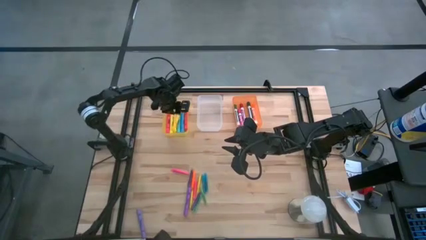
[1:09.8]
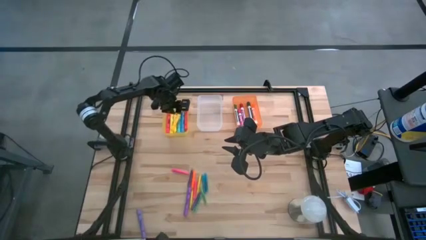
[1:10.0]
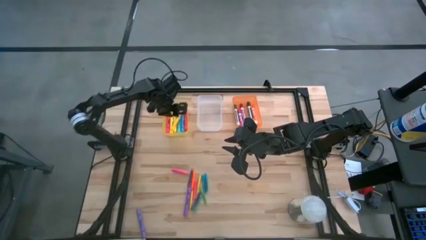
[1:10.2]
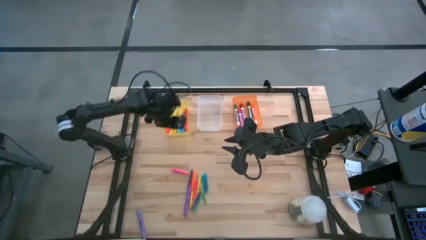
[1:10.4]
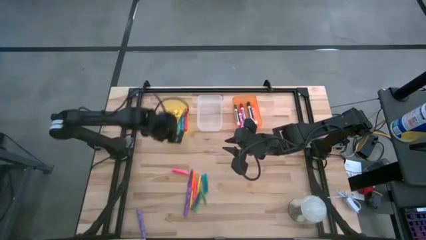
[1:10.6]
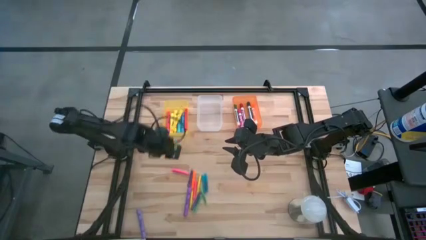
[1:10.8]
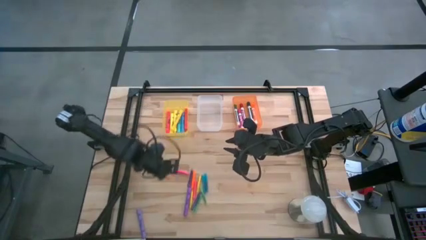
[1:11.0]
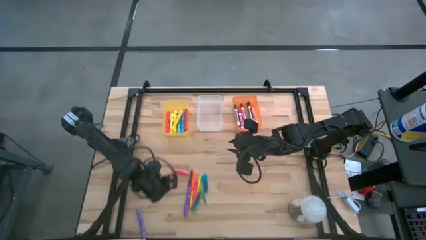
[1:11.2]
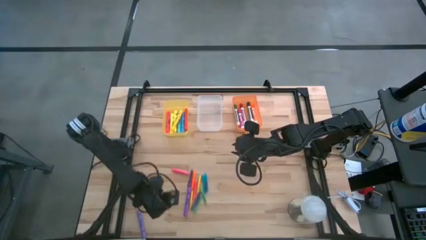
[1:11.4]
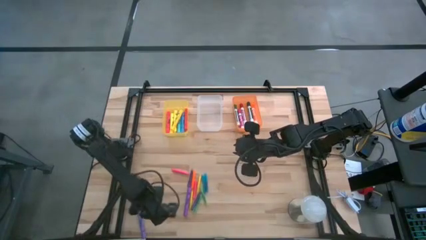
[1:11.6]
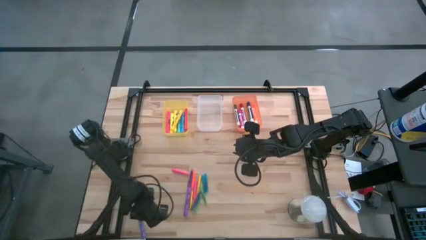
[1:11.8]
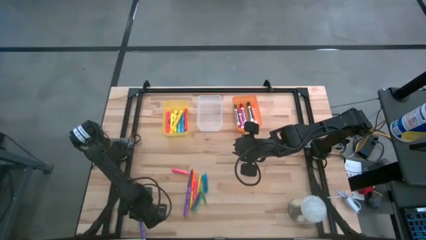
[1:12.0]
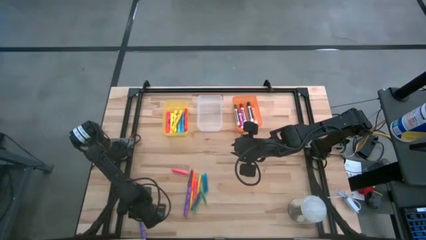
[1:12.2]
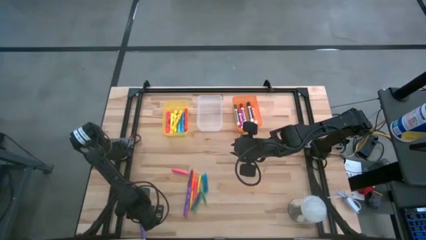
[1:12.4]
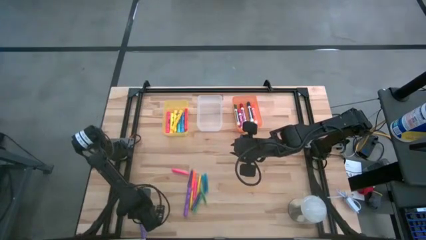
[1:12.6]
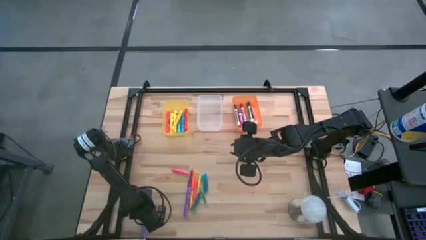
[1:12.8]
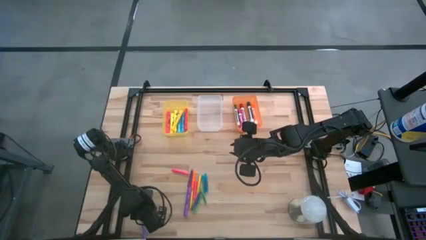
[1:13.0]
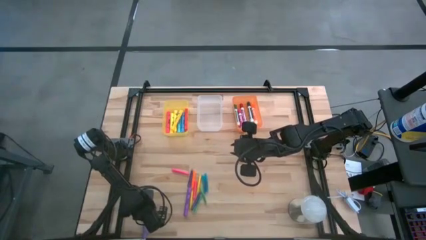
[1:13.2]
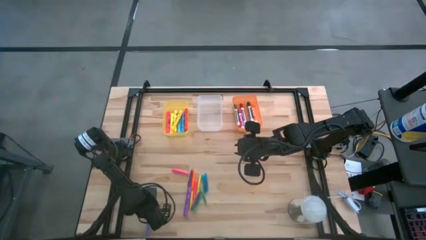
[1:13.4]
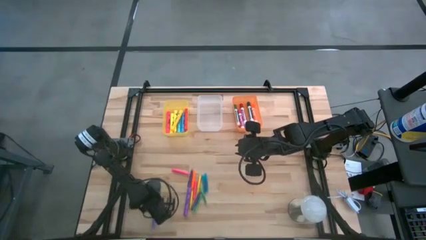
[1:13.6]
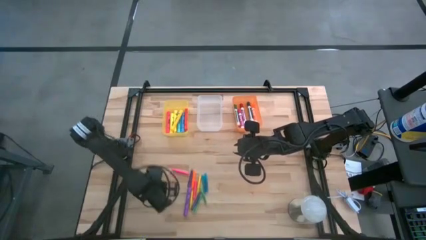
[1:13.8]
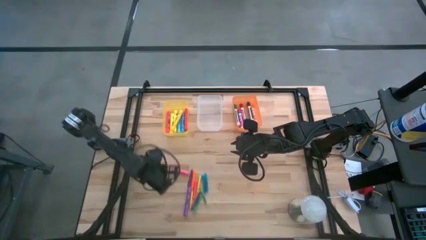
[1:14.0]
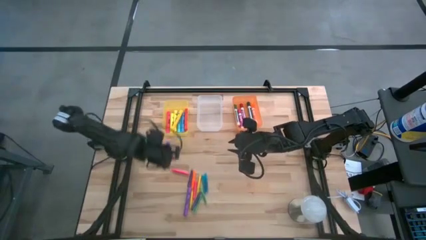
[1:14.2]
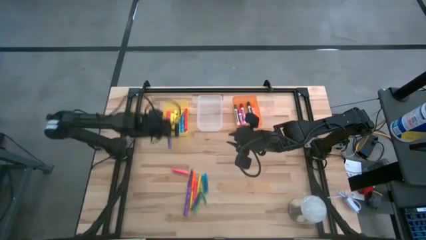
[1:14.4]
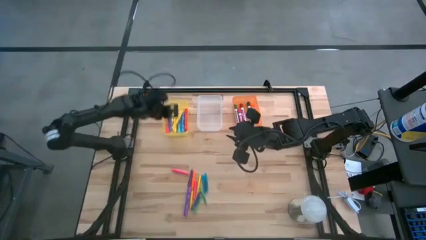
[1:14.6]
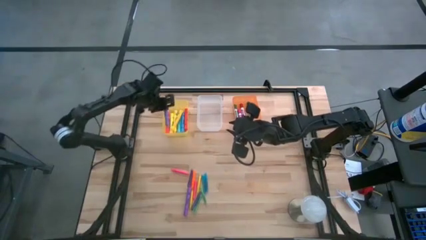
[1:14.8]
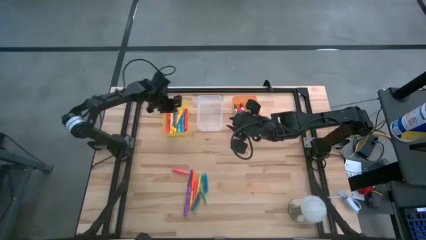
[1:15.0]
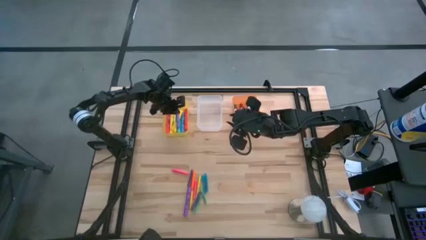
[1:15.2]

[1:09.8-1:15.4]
Task: Pick & Place Markers
Put the light purple highlighter pen into the yellow bin

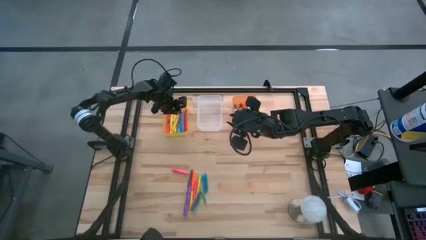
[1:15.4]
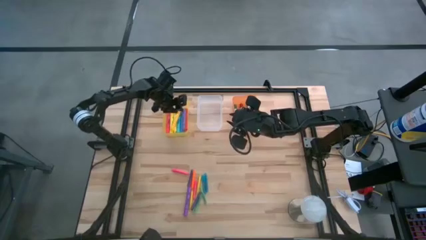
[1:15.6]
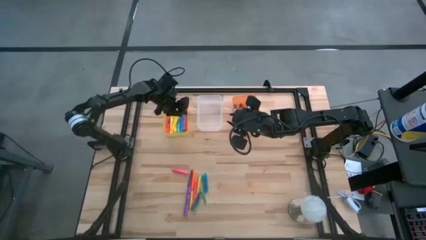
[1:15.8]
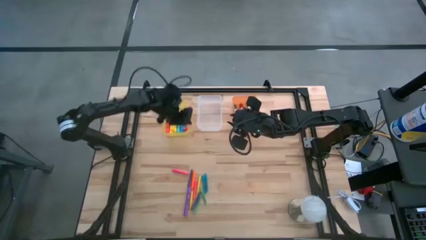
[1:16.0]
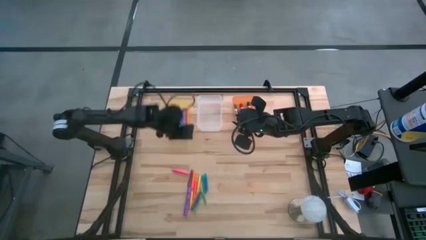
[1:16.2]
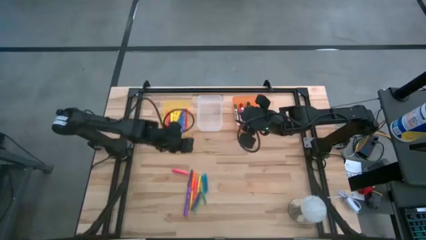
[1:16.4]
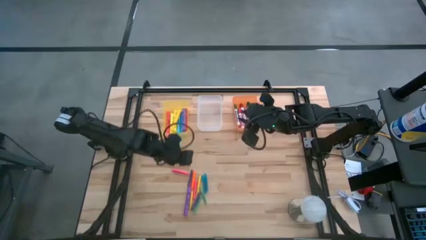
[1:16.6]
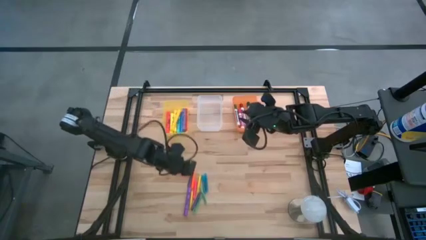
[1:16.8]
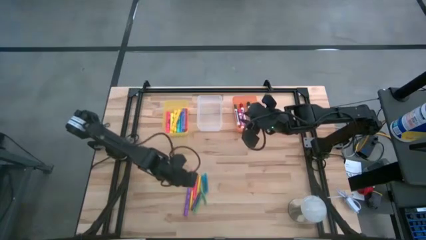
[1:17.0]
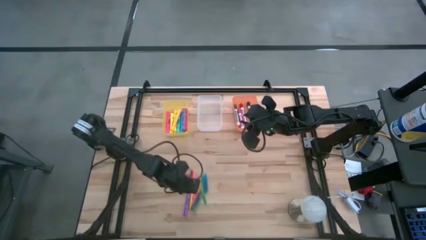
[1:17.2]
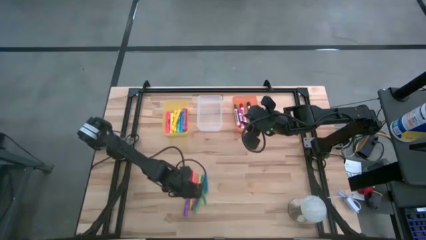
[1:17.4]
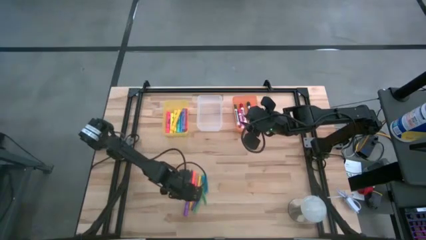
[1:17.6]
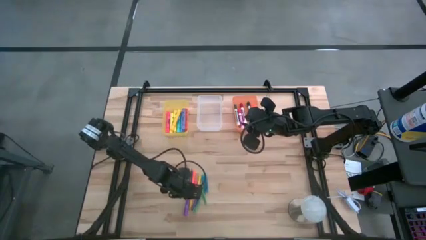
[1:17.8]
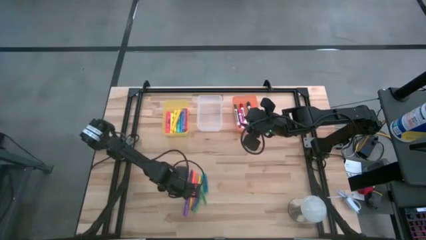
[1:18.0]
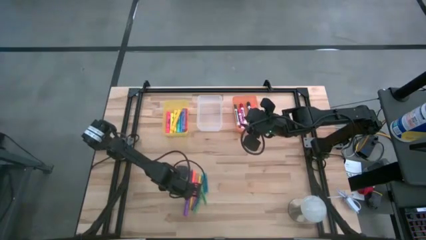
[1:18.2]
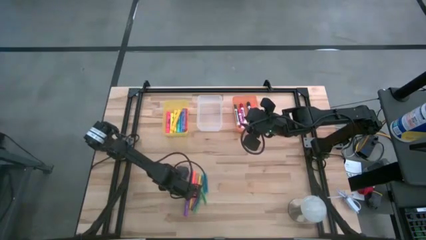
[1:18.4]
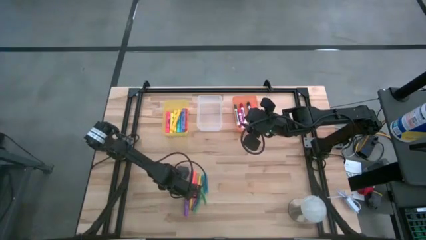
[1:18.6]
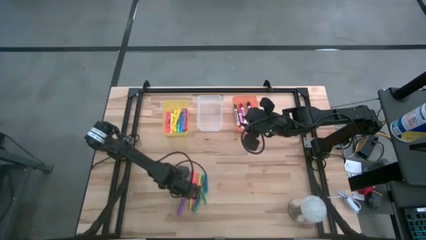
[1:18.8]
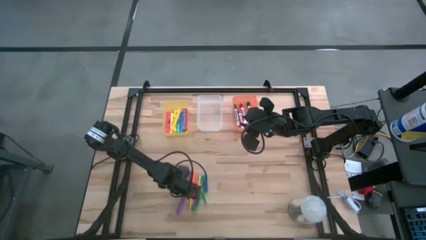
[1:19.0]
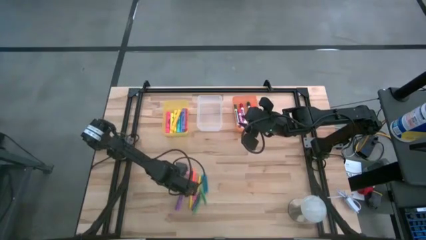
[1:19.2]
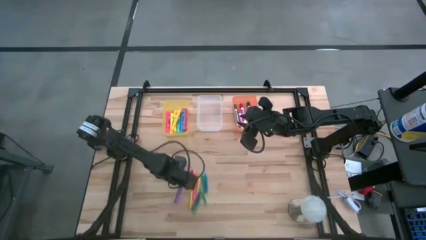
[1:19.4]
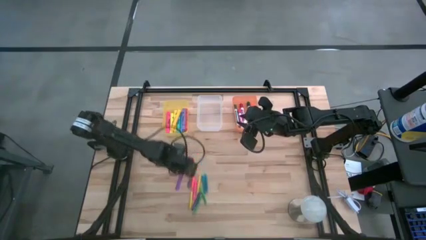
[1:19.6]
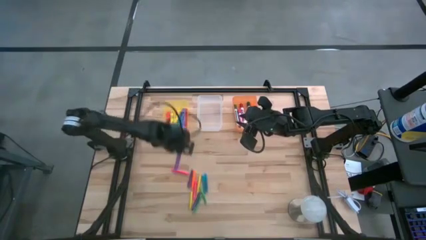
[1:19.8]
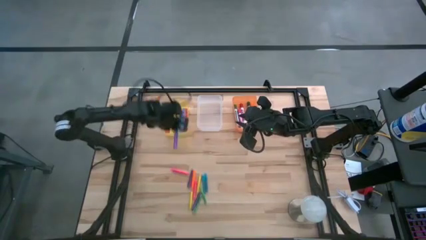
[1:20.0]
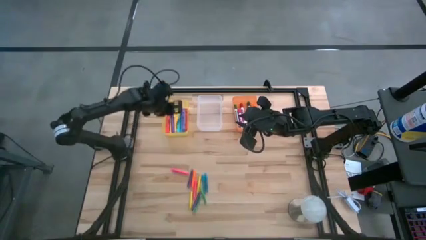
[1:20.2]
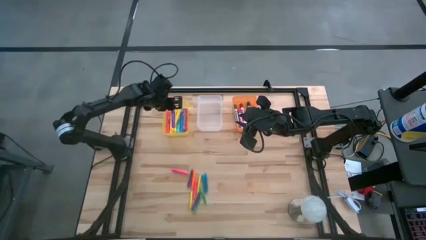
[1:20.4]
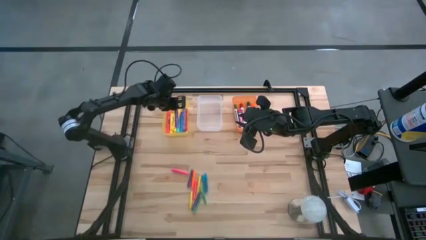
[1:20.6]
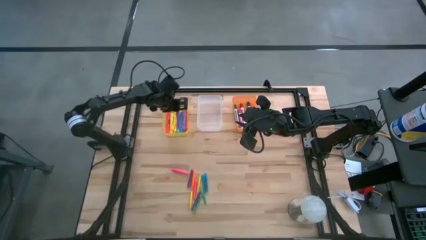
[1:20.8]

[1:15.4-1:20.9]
Put the purple highlighter pen into the yellow bin

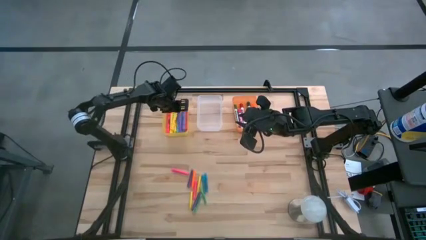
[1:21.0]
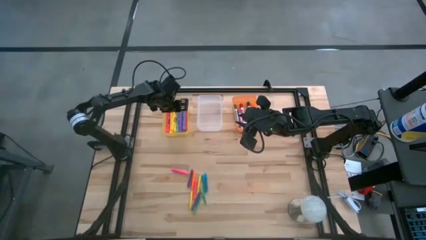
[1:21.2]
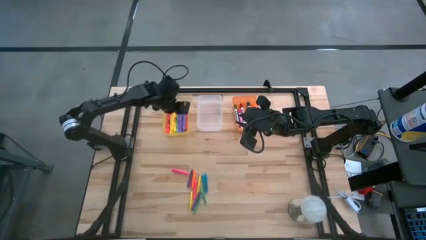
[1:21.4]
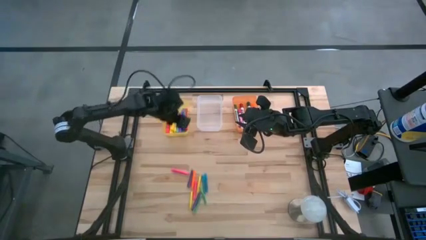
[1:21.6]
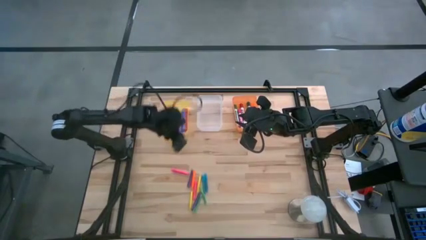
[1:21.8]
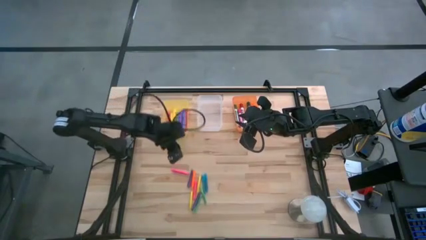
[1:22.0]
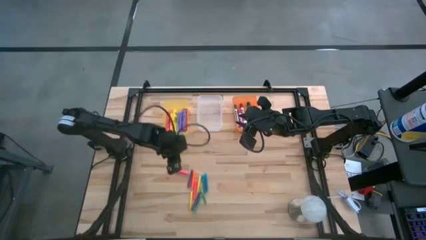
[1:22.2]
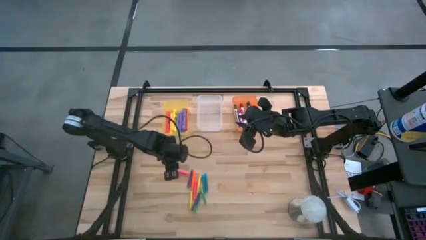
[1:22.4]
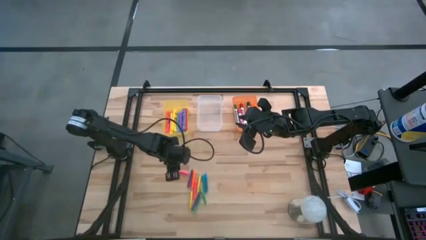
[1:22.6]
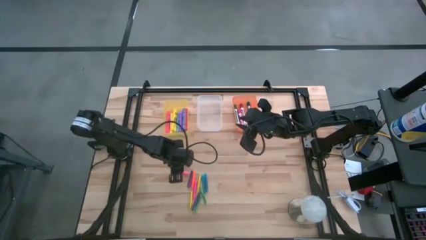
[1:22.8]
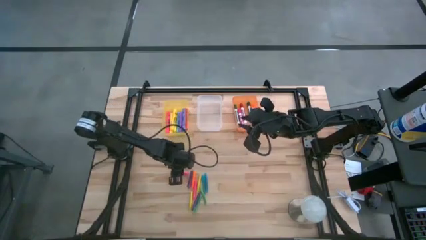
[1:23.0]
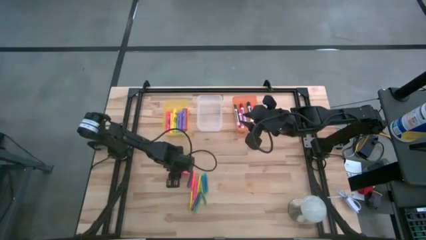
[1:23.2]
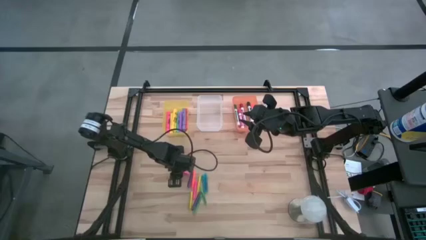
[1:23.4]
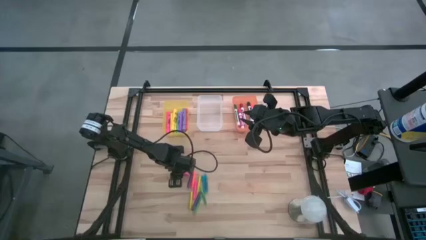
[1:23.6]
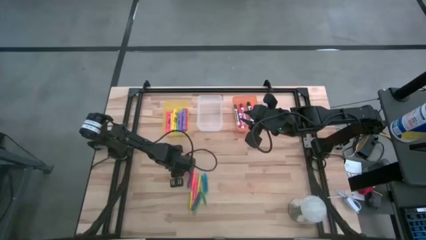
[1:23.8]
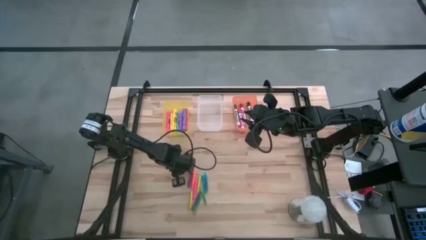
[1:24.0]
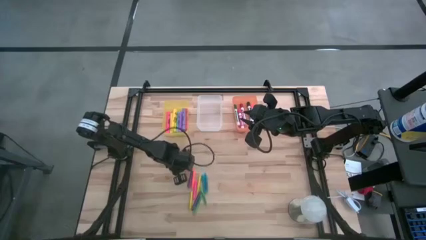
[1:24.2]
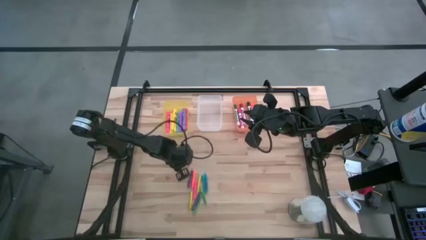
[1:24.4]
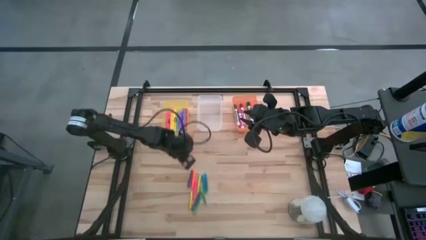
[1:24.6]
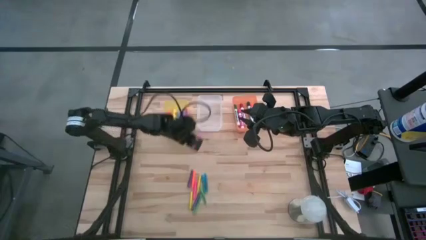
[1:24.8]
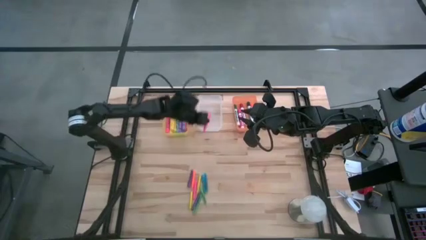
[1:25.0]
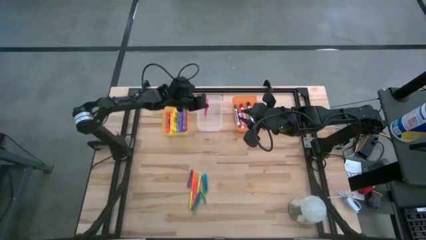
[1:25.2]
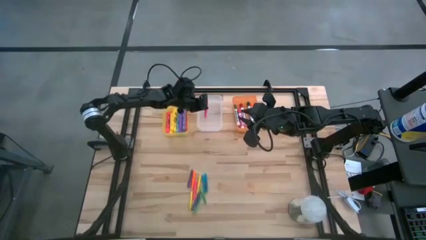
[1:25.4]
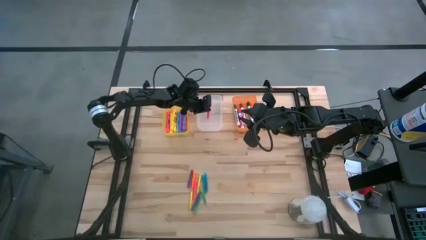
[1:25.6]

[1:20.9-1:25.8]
Put the top pink pen into the white bin

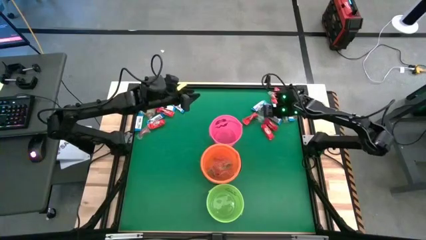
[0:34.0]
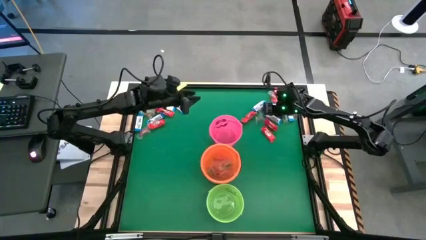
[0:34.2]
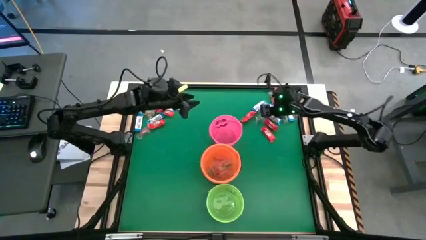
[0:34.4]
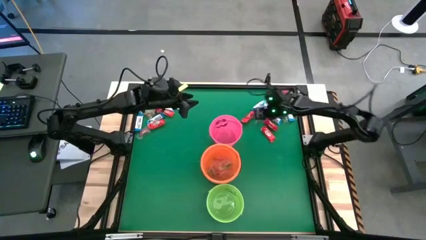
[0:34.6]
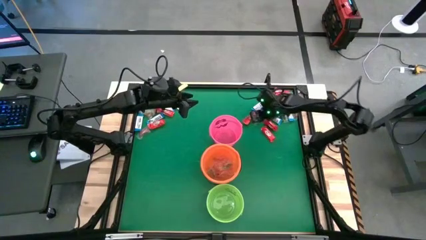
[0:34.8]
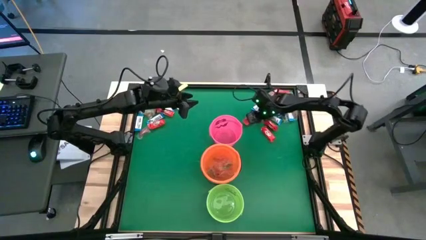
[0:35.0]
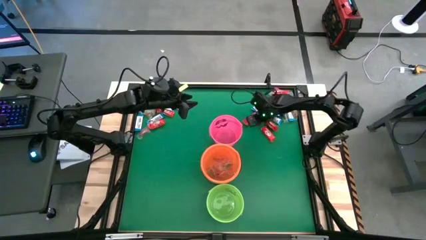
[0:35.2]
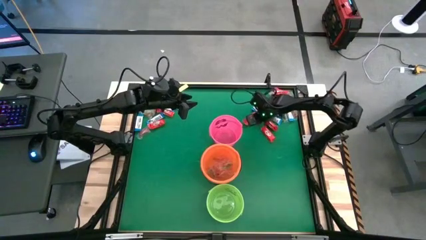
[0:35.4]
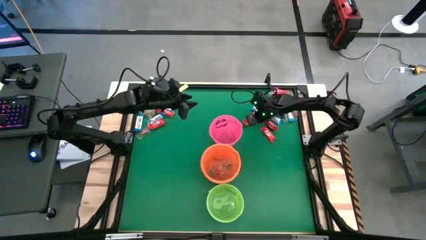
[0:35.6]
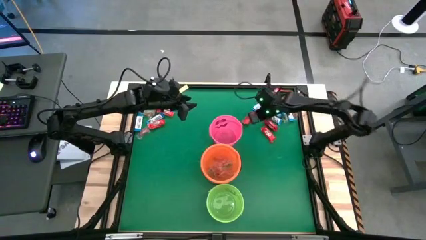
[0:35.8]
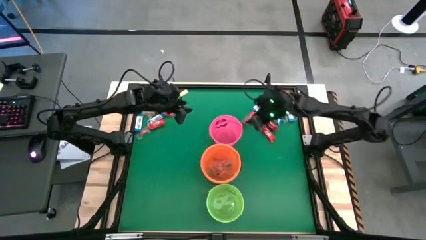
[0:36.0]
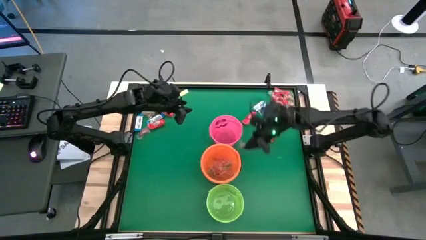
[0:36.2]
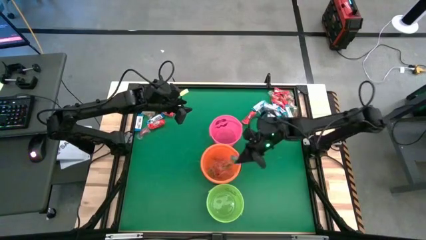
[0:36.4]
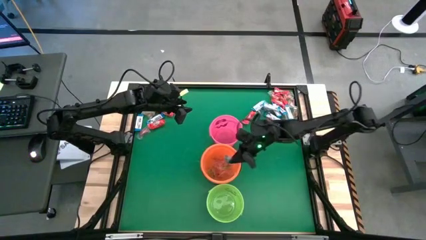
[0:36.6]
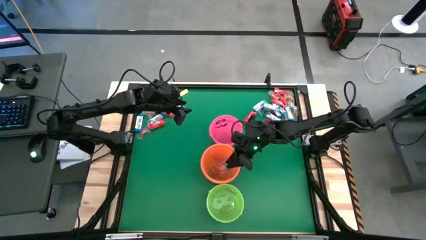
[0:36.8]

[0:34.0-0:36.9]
Task: Sort candy by brand, put in halloween buckets
Put the blue gummy into the orange bucket
